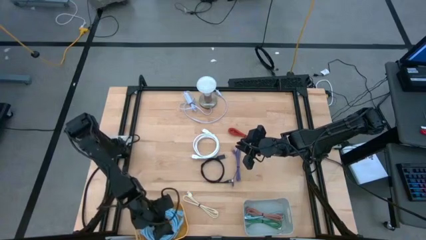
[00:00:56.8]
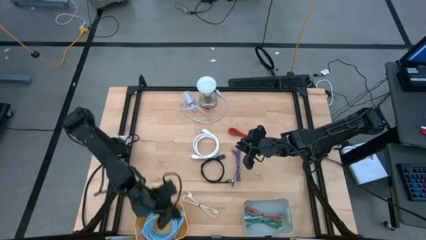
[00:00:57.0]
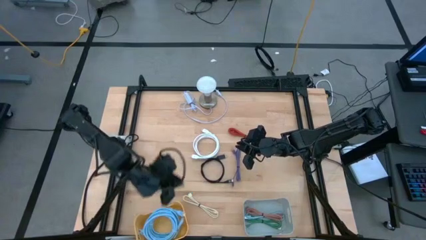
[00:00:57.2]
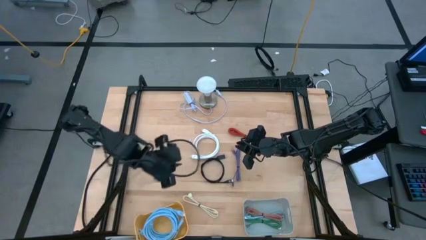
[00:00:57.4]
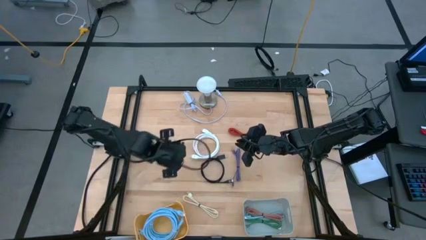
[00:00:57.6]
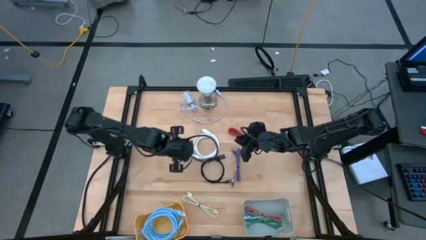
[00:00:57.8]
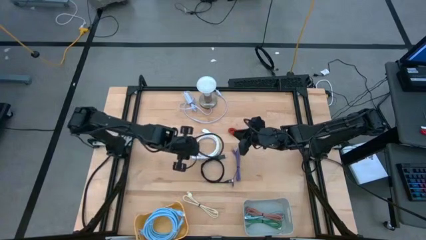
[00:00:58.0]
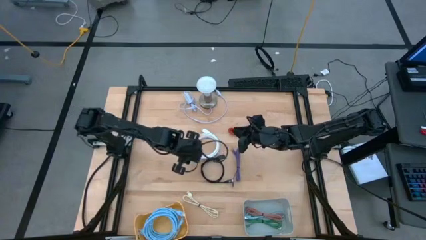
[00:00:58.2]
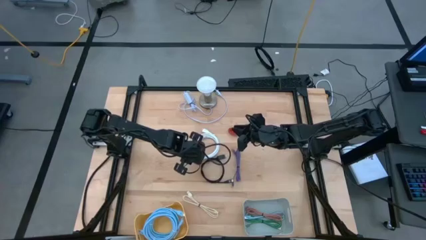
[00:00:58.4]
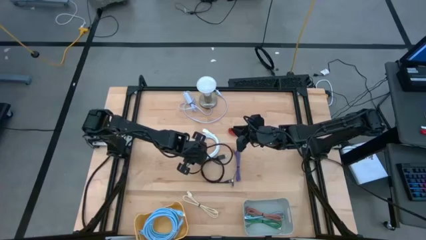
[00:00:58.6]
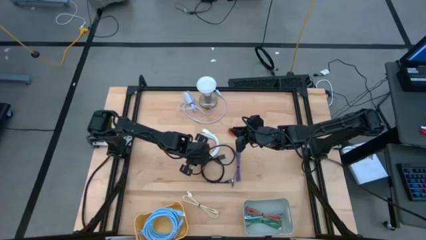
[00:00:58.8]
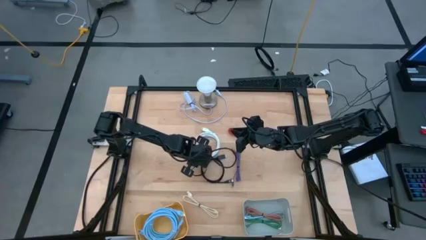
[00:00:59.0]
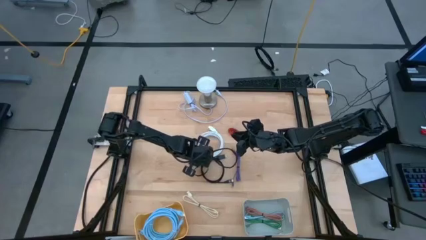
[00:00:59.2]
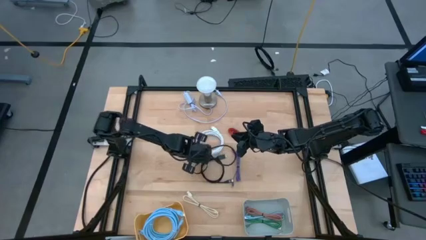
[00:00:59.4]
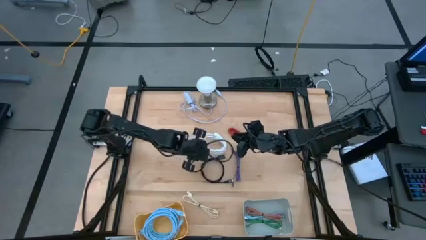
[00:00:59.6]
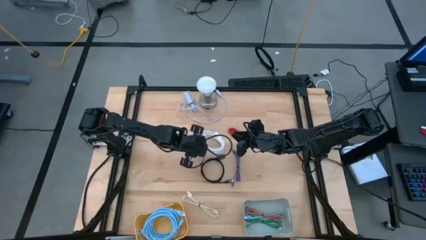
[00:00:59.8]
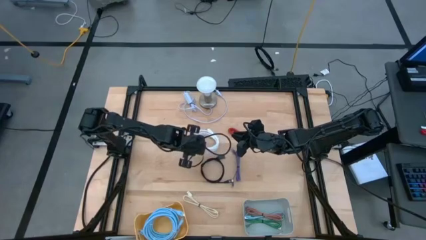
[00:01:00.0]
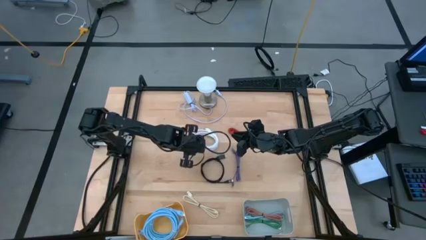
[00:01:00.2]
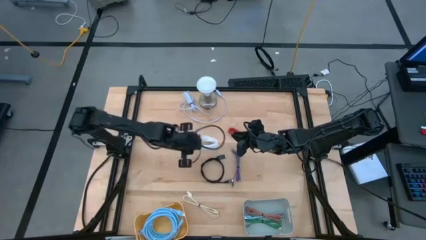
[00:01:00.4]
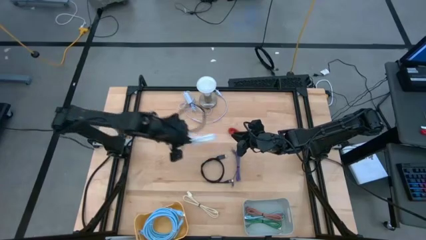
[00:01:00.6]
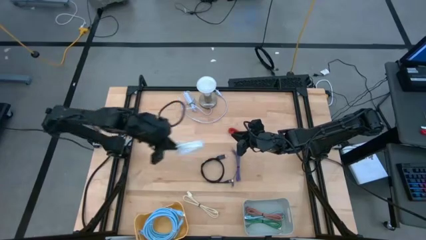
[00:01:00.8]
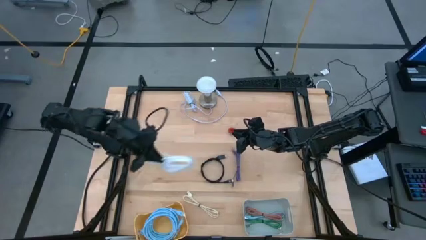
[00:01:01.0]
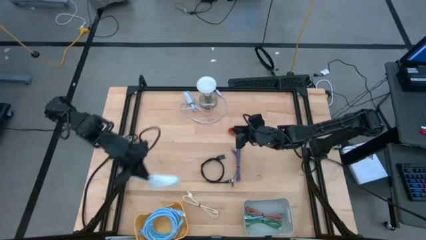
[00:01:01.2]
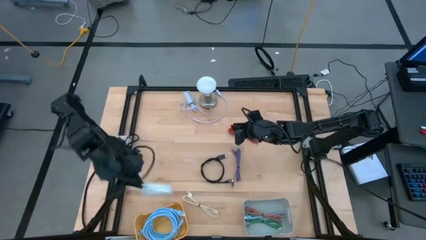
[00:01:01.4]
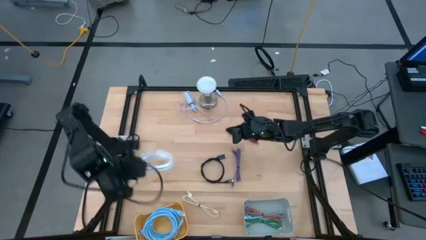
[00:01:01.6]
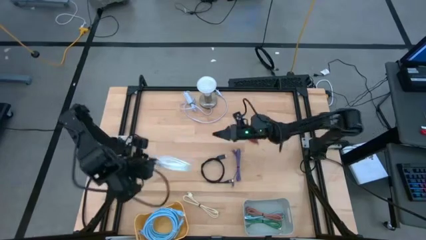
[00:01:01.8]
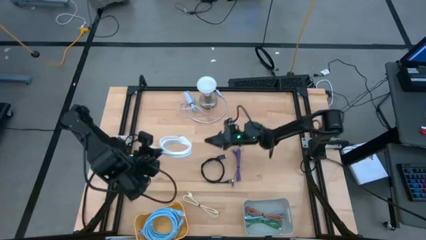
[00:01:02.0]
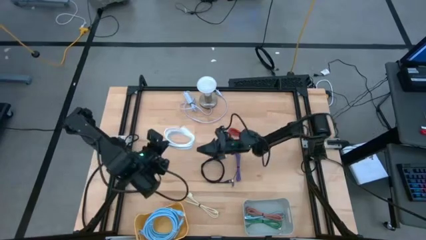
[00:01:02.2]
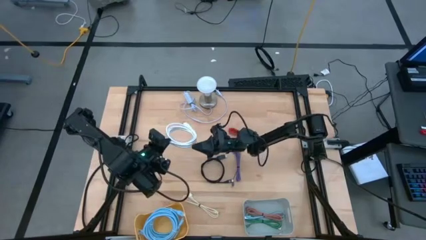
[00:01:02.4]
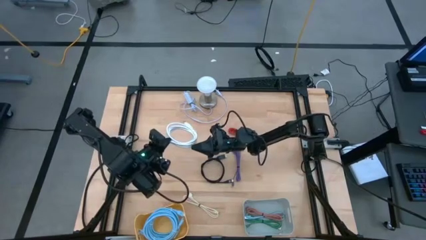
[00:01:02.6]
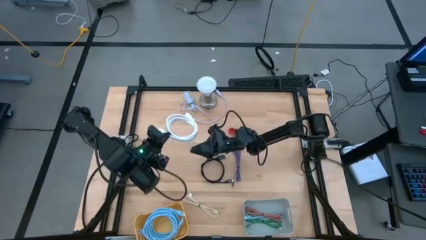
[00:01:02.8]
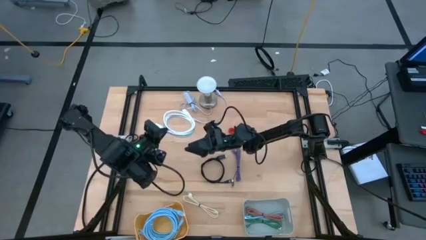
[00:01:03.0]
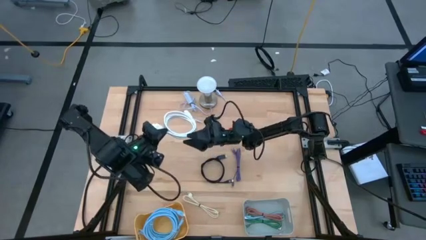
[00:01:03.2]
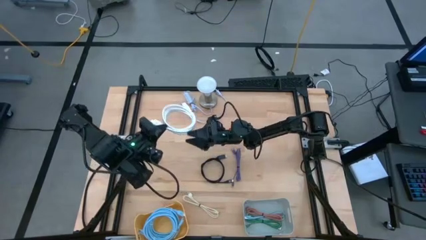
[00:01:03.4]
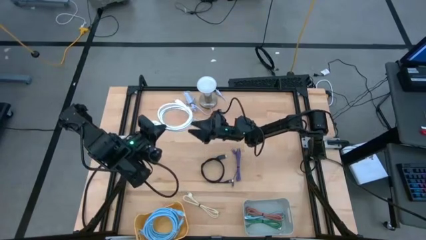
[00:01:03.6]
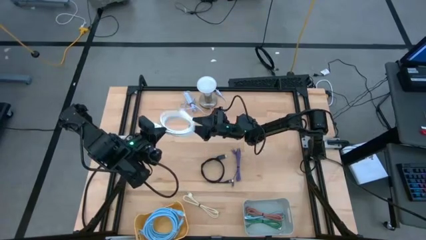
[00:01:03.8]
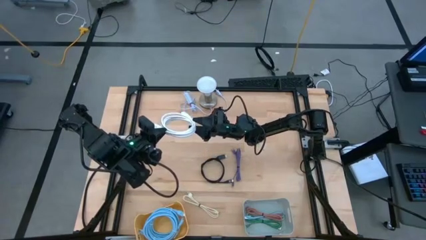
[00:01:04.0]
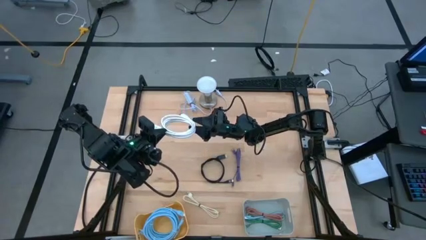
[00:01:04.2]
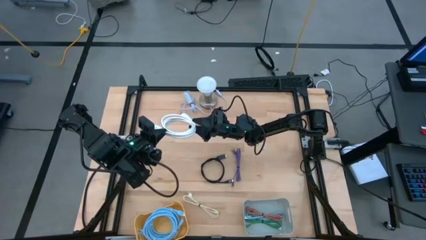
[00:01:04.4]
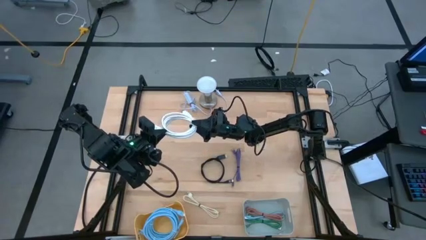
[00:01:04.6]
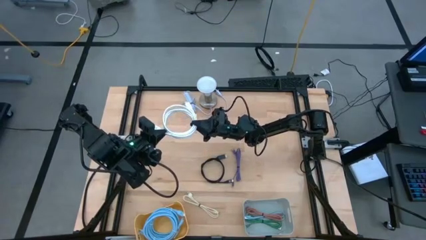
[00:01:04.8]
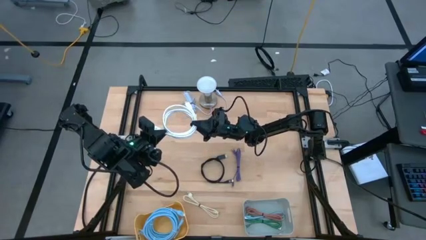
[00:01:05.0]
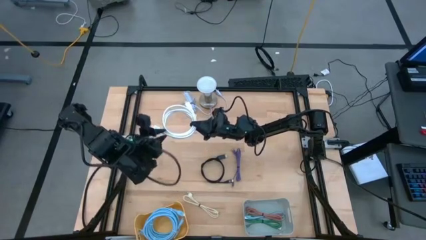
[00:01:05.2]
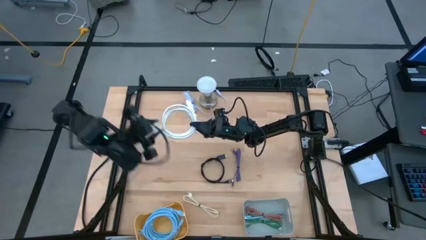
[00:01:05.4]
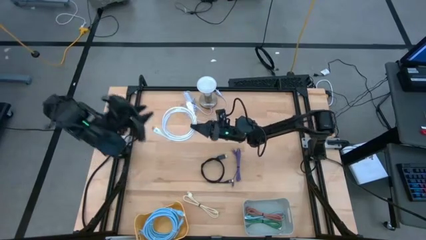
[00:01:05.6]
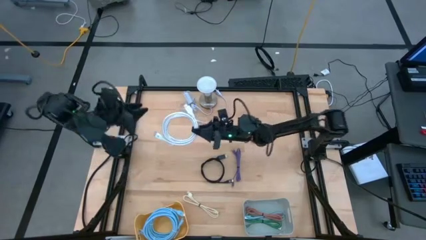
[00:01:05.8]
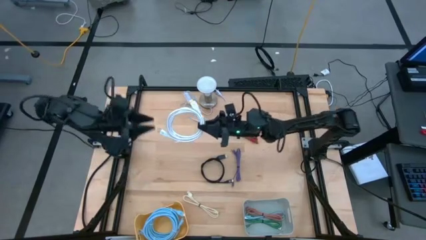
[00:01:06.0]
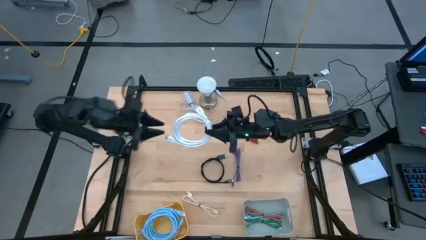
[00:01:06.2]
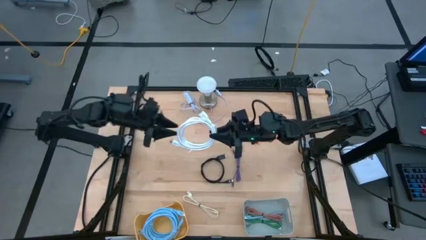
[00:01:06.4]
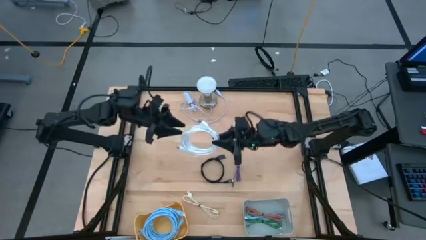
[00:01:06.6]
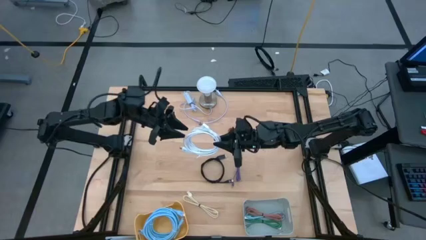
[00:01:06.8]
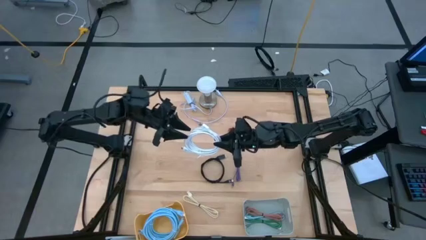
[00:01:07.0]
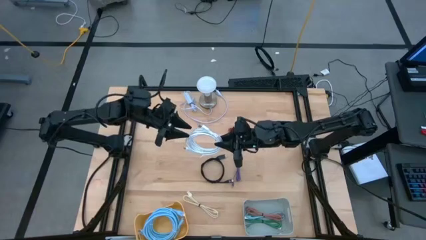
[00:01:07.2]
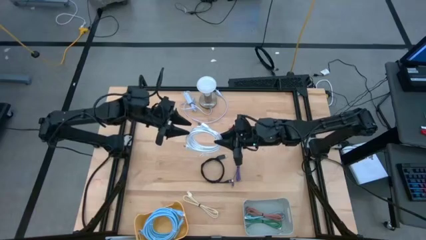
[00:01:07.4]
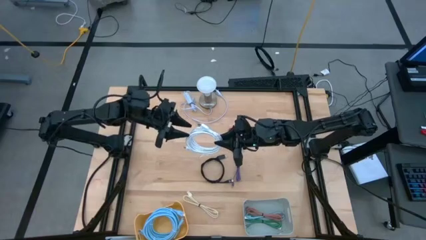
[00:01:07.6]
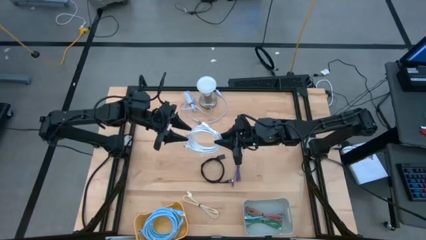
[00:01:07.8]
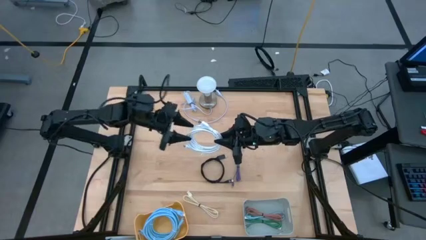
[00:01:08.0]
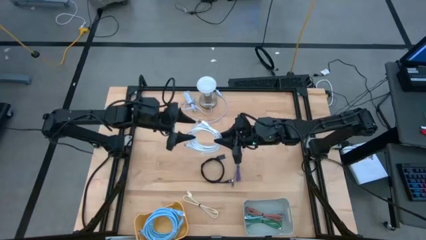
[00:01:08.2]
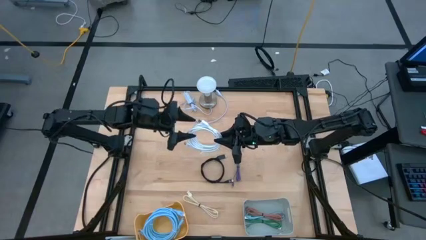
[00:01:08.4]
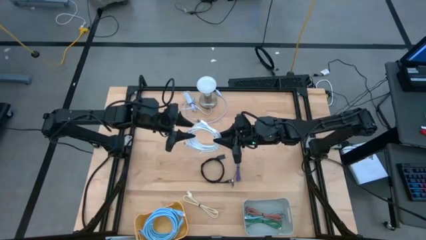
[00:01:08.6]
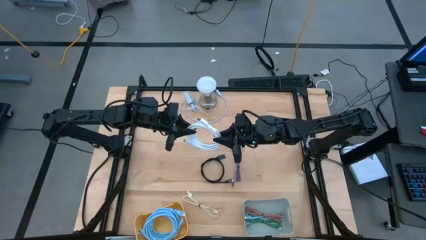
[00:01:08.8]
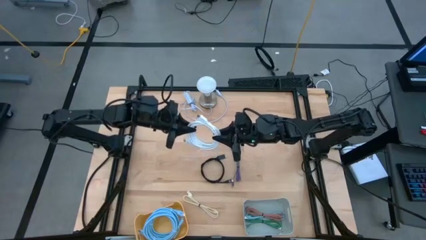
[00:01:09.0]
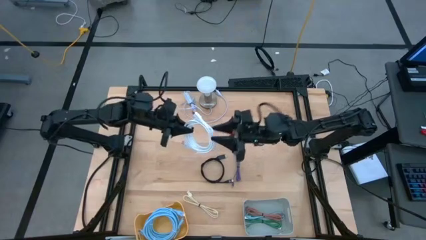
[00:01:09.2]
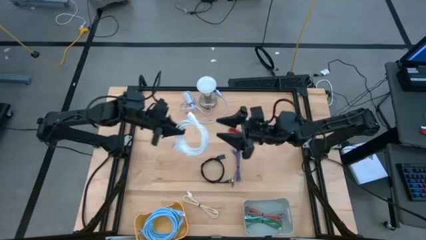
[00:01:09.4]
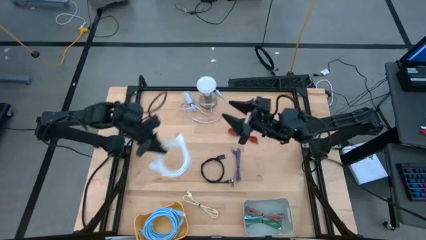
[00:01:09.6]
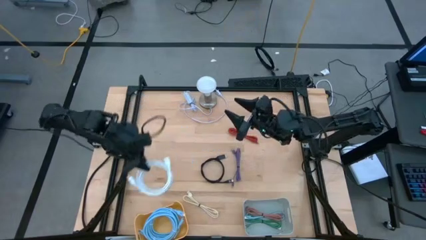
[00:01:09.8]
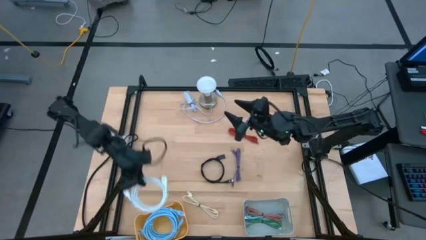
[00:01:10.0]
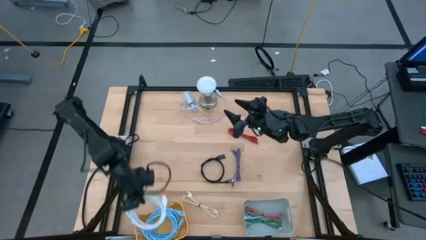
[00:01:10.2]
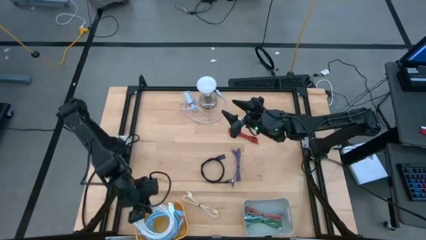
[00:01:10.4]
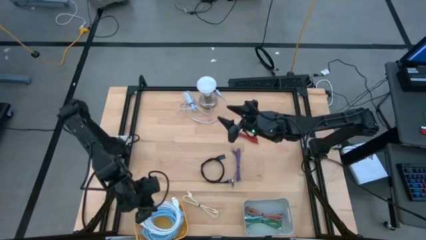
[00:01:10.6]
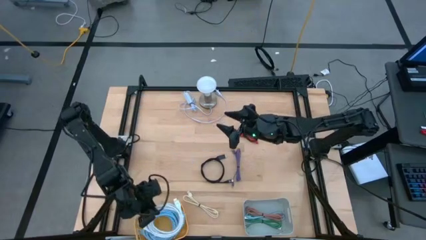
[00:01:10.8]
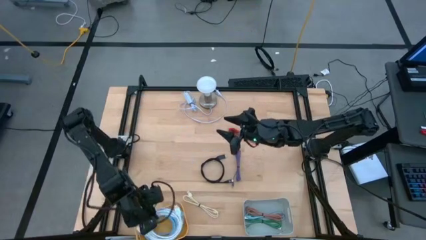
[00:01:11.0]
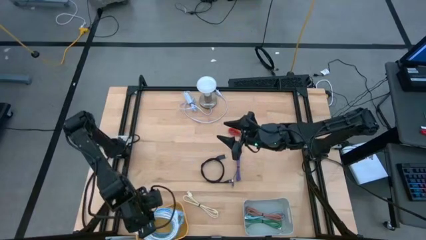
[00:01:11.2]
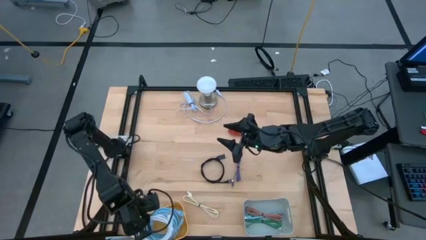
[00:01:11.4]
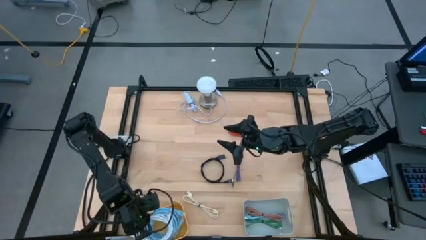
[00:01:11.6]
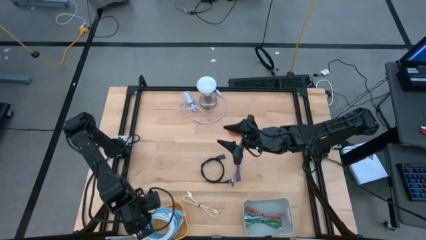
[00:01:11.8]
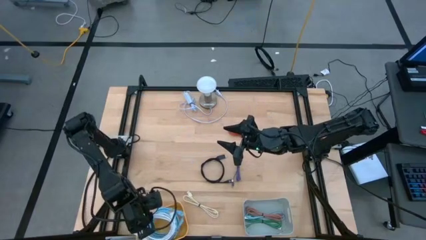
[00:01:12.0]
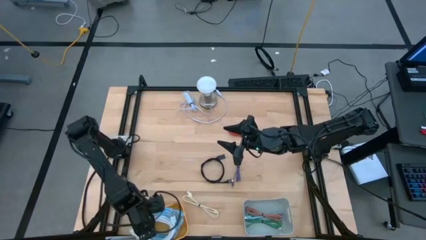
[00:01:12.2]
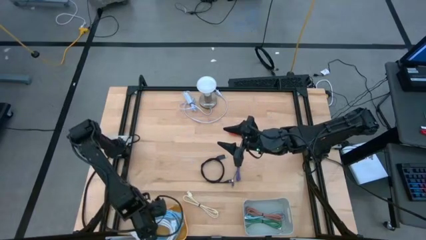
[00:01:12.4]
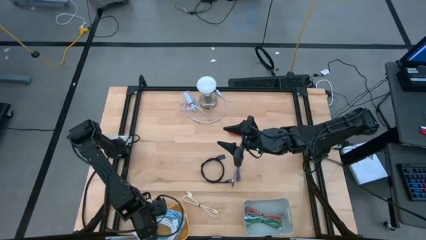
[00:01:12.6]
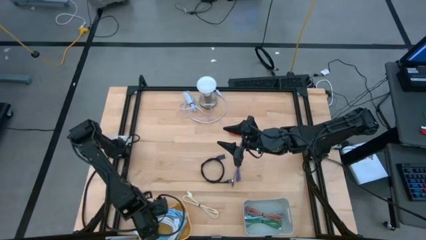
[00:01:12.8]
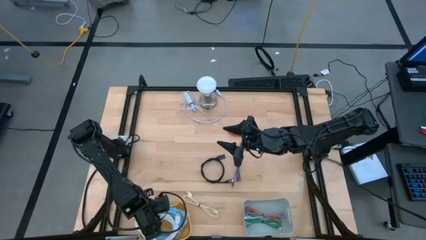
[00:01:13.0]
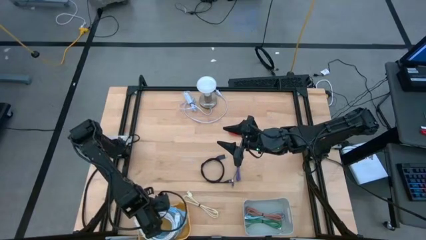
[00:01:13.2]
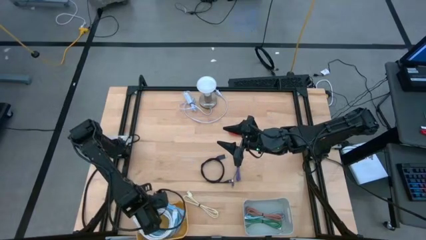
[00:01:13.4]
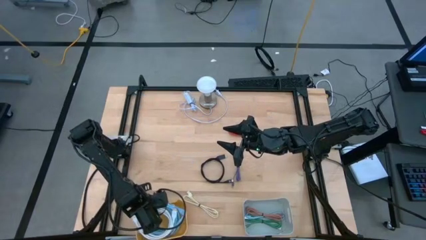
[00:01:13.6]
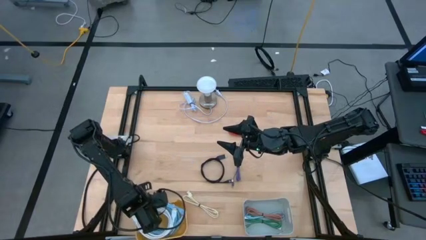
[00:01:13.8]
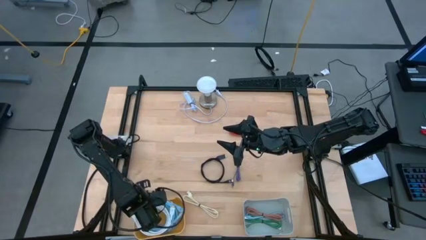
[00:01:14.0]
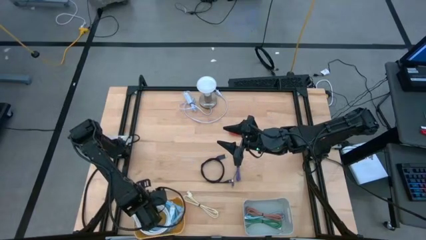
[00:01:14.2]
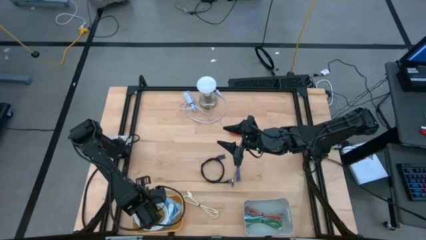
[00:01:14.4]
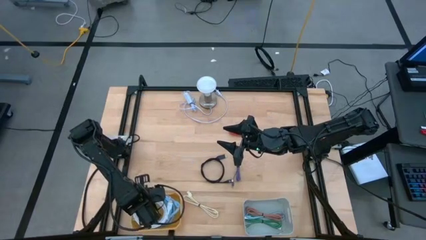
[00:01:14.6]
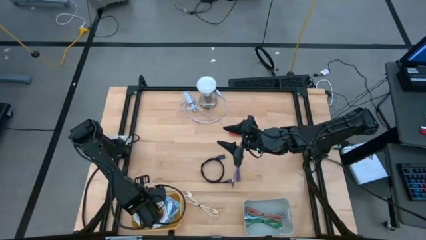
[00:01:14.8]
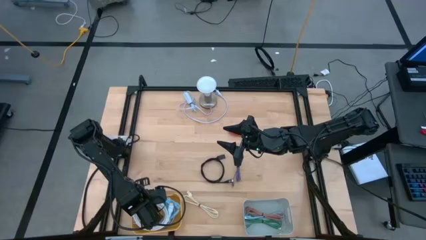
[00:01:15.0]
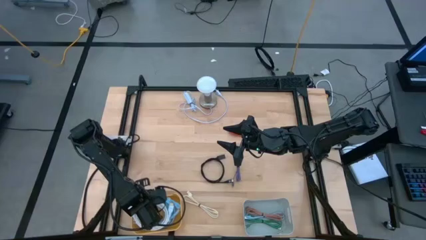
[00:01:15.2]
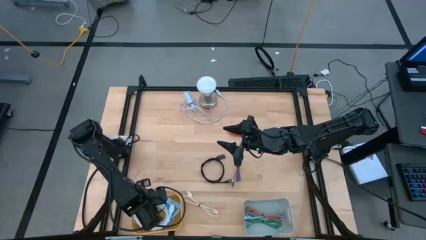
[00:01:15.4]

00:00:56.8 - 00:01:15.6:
Task: Pick & Place USB Port
Put the white HDMI cable into the orange bin
